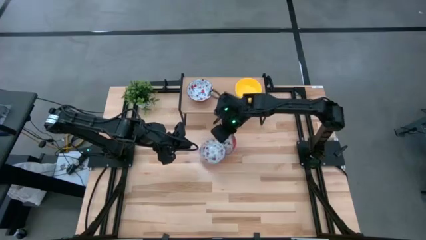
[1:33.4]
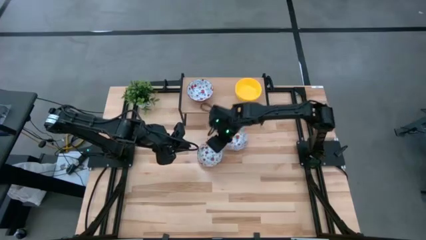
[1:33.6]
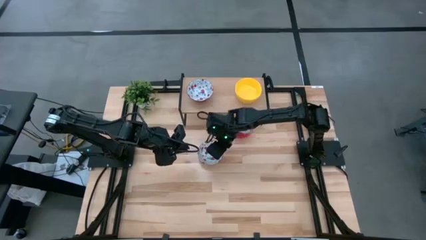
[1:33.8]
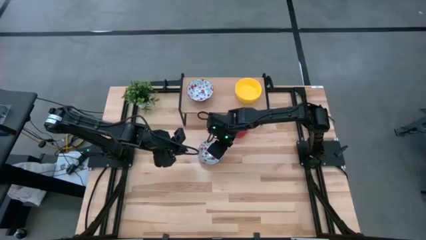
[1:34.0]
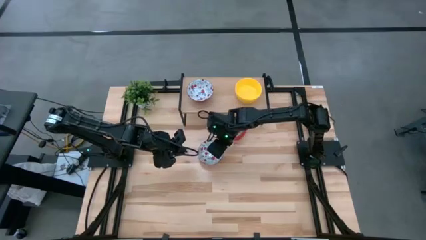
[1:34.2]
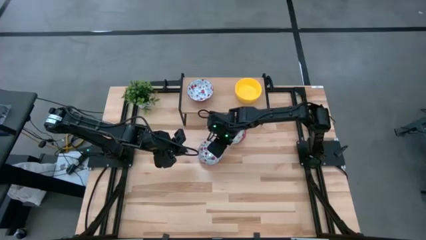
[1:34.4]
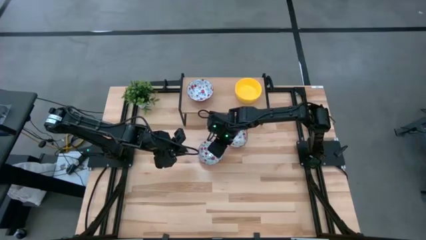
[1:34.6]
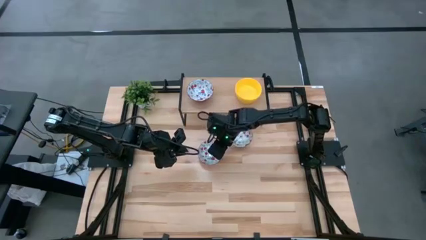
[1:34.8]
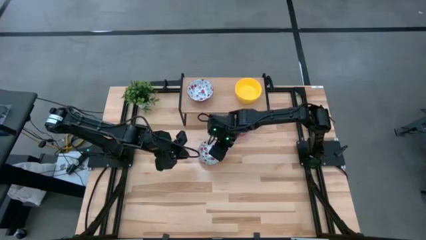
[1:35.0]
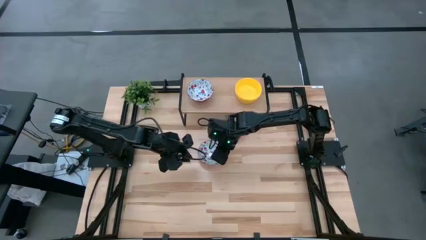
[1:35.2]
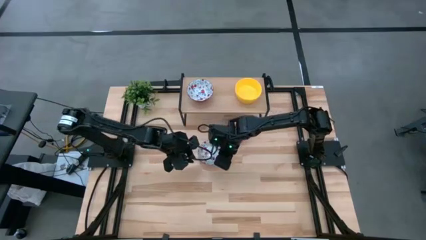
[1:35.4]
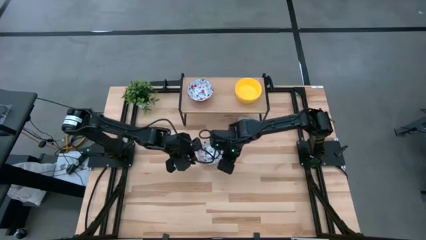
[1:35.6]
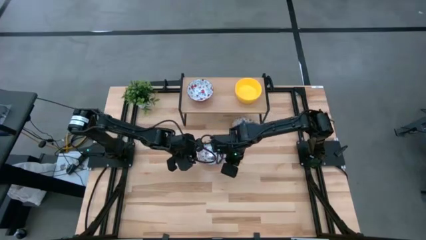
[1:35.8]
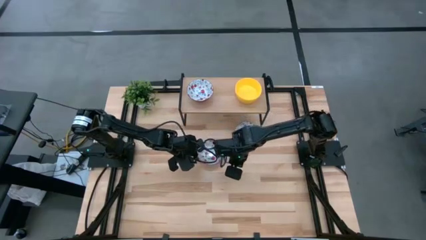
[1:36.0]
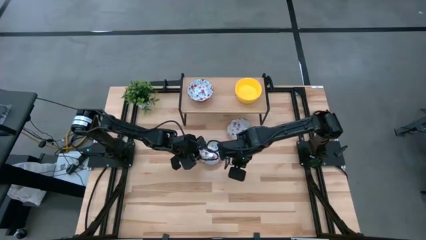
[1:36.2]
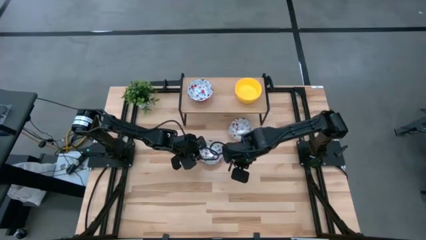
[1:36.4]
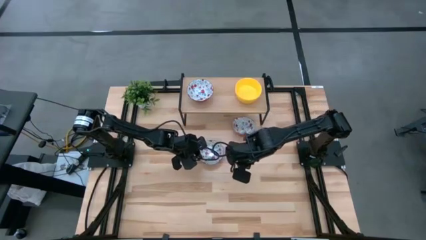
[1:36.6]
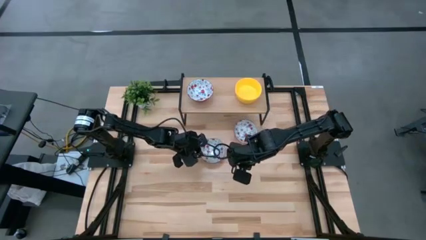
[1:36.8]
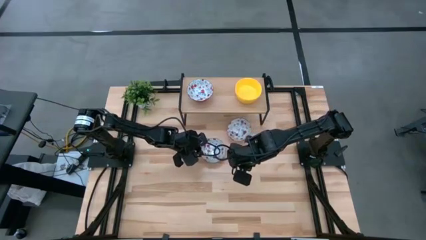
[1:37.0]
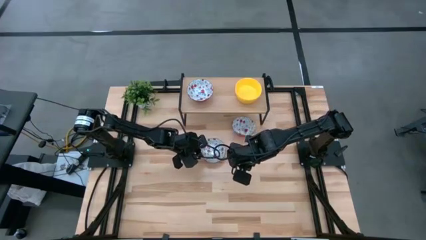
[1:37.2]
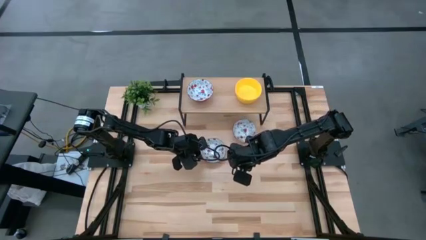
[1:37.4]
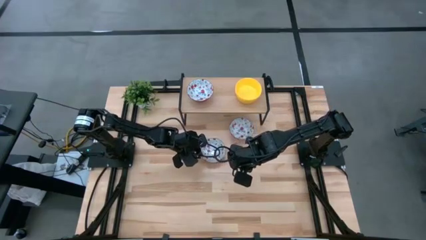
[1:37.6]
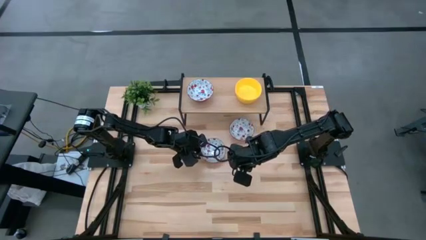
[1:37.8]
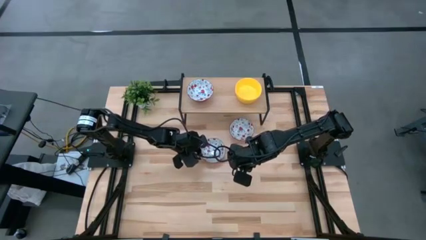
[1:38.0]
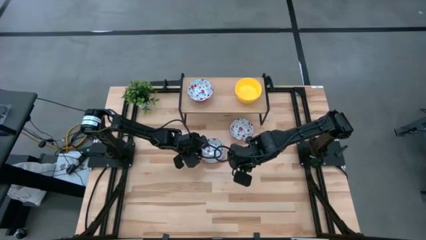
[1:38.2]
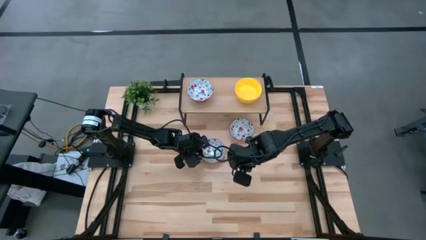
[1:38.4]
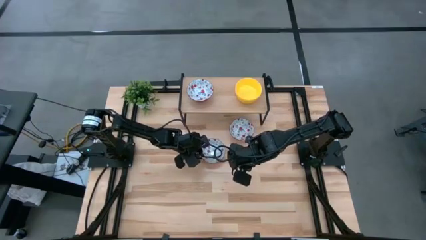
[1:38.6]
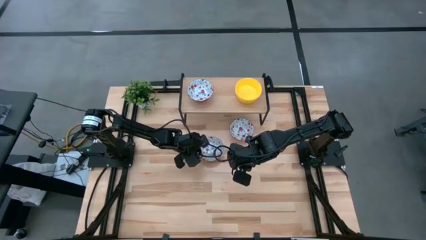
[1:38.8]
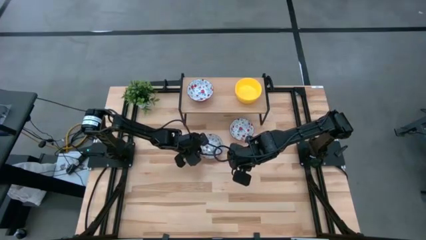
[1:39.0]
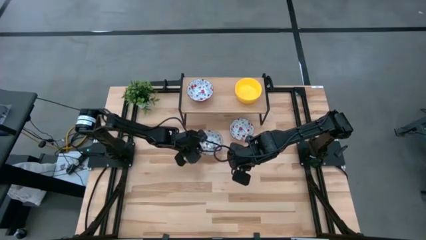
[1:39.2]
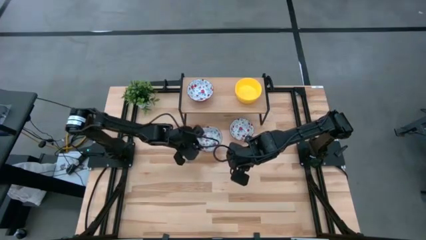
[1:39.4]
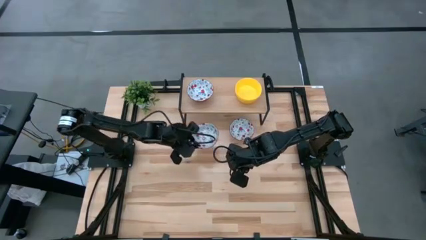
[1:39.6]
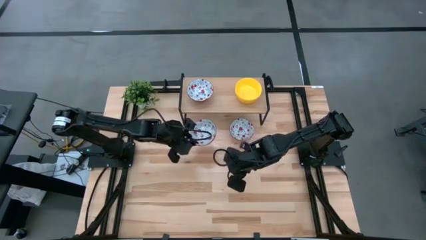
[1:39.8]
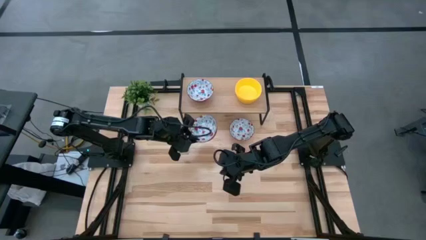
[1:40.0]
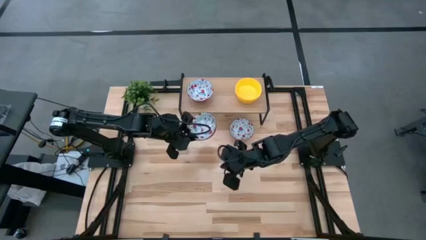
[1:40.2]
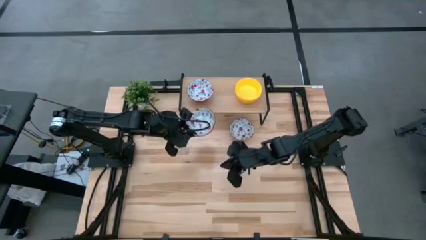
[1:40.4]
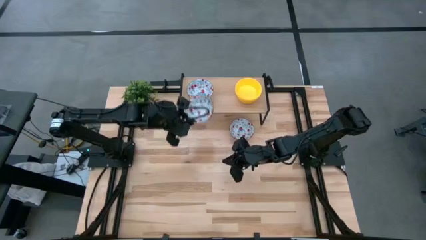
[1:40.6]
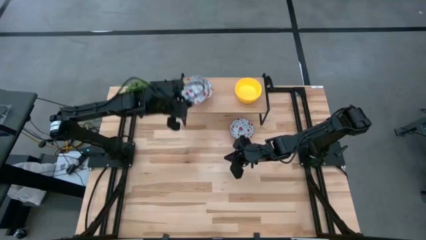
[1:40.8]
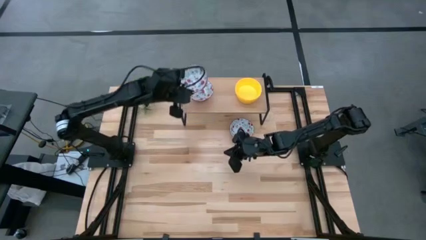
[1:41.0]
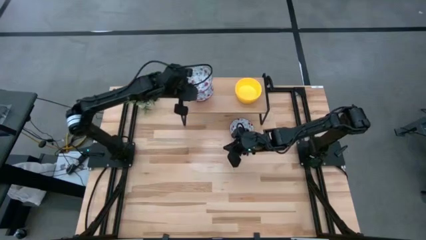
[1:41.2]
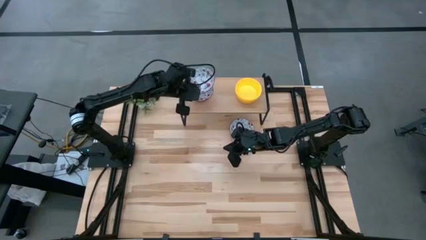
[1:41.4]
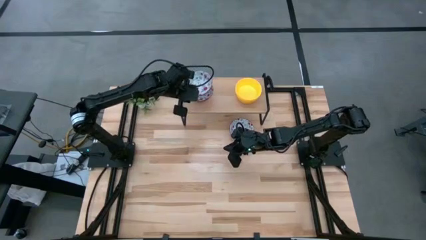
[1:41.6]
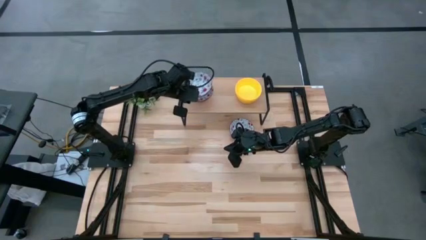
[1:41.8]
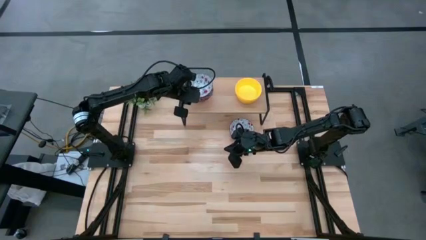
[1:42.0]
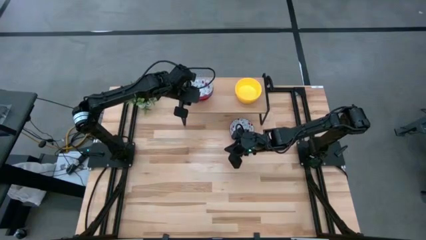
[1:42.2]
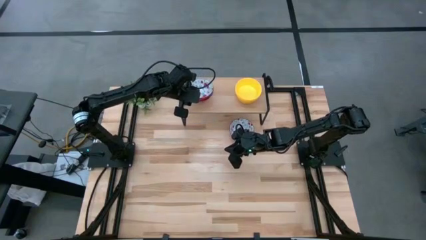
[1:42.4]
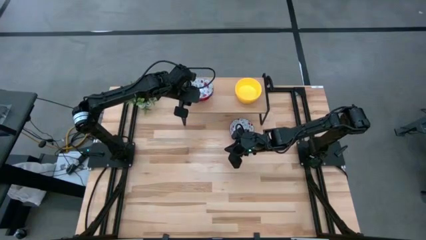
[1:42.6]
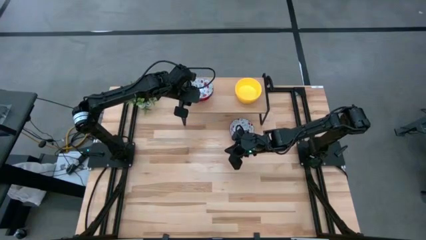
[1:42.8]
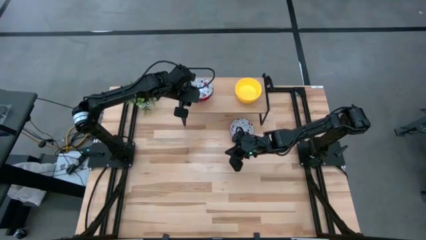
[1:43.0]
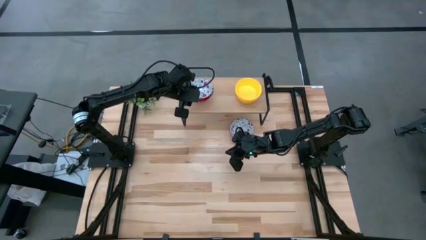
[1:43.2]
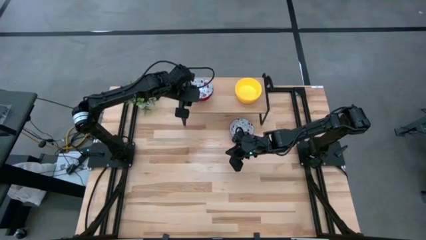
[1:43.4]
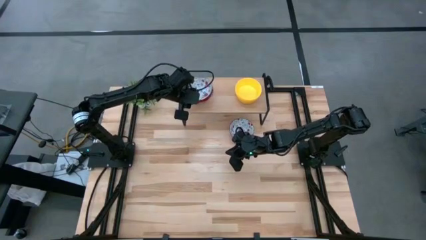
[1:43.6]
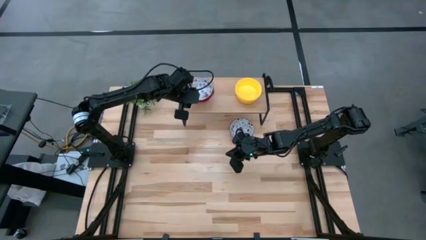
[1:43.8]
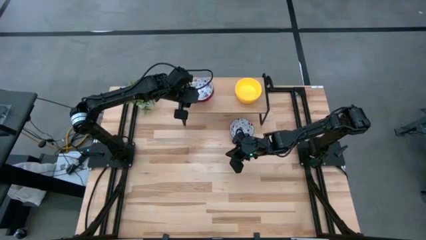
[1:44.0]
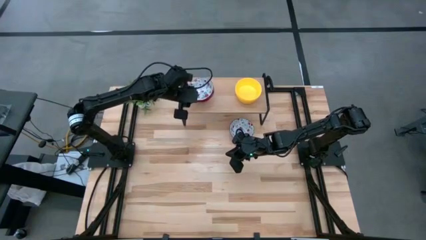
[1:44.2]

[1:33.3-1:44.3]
Task: Pick & Place Mini bowls
Stack the bottom red bowl on the other red bowl on the shelf
